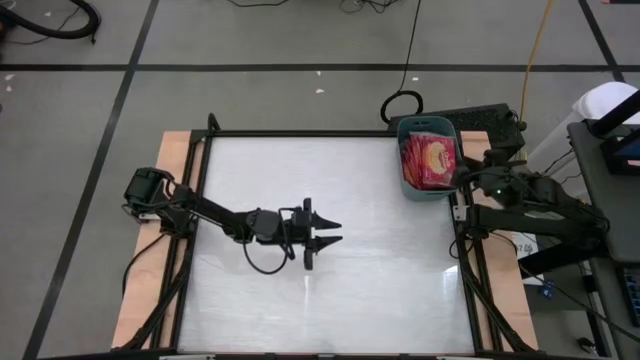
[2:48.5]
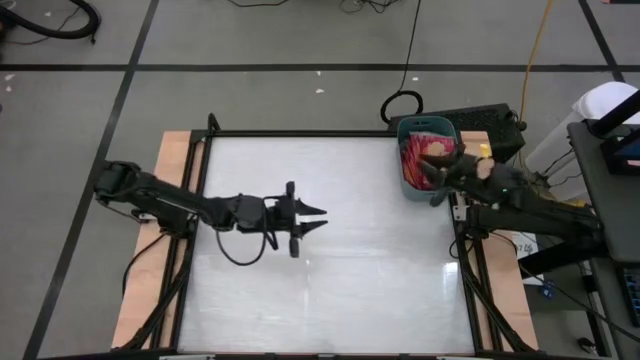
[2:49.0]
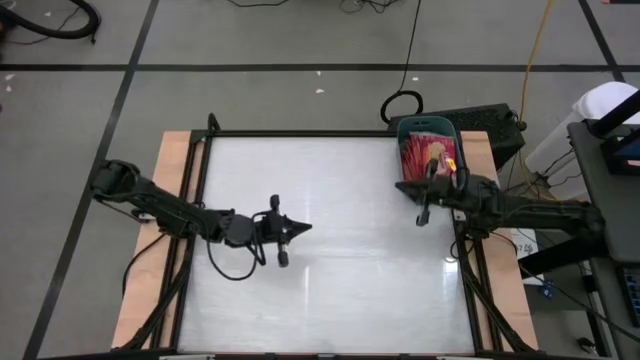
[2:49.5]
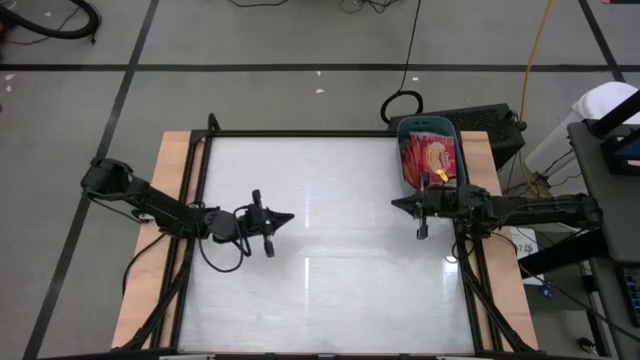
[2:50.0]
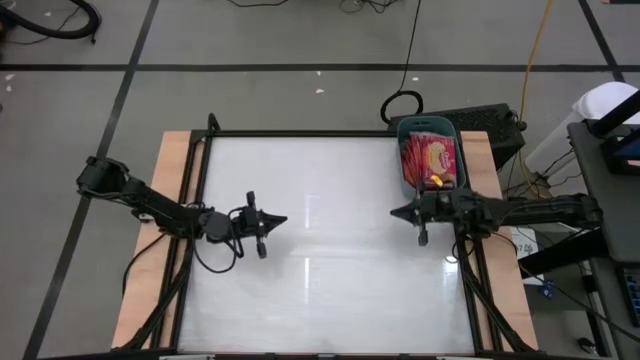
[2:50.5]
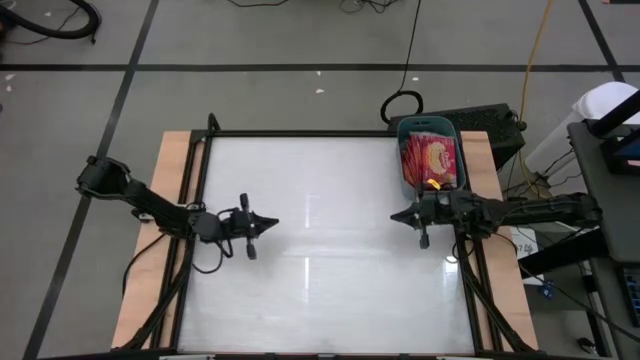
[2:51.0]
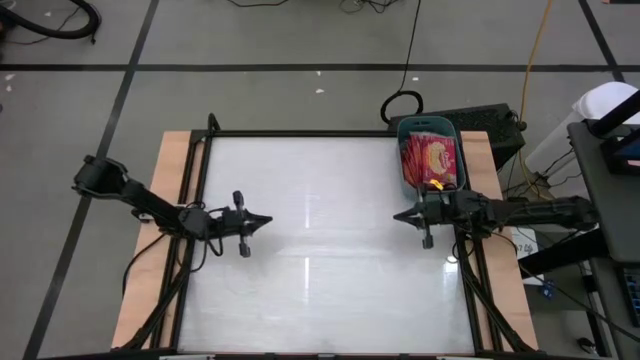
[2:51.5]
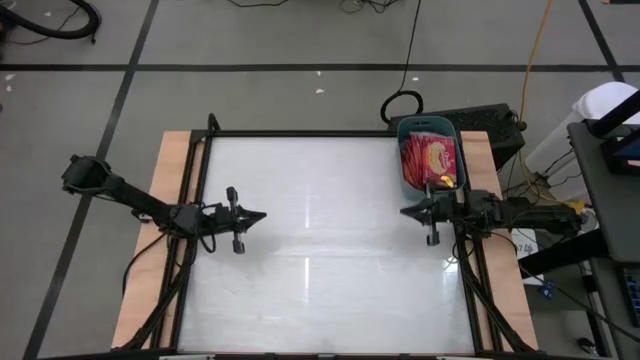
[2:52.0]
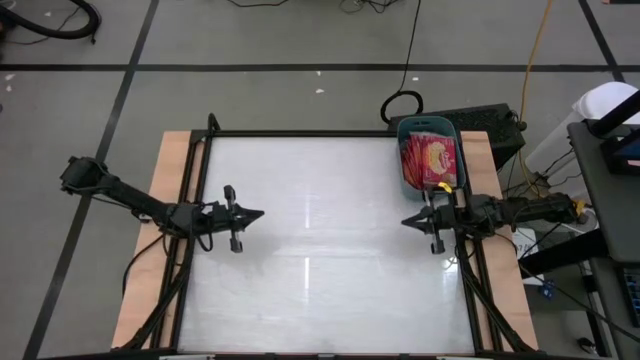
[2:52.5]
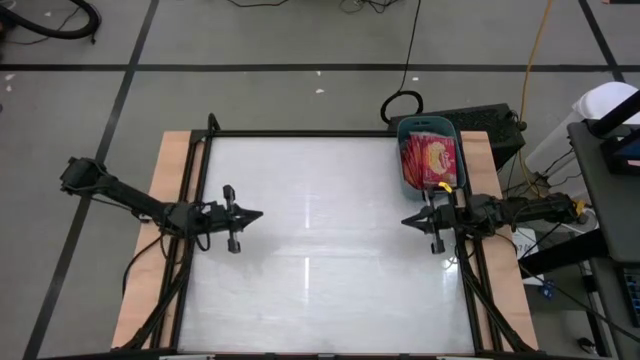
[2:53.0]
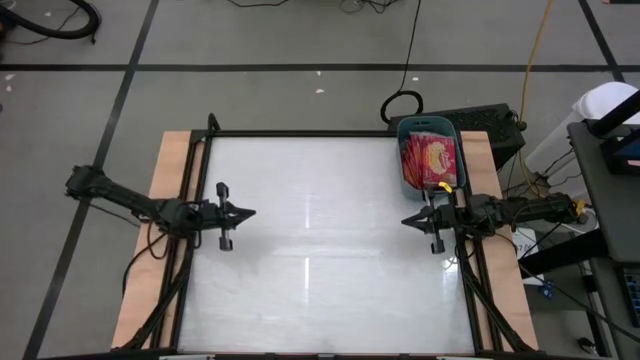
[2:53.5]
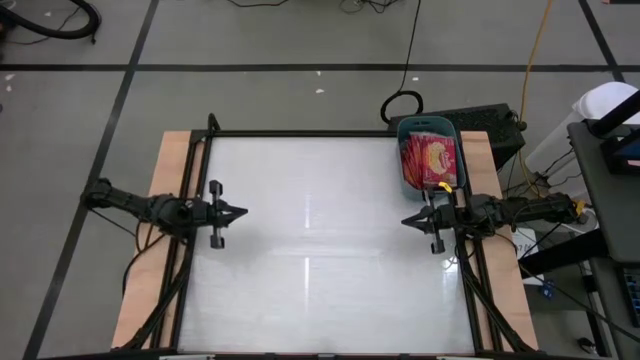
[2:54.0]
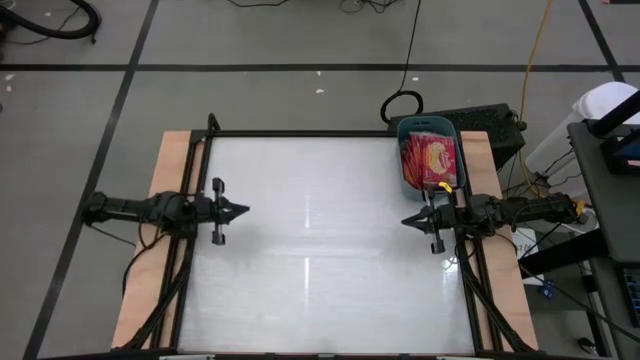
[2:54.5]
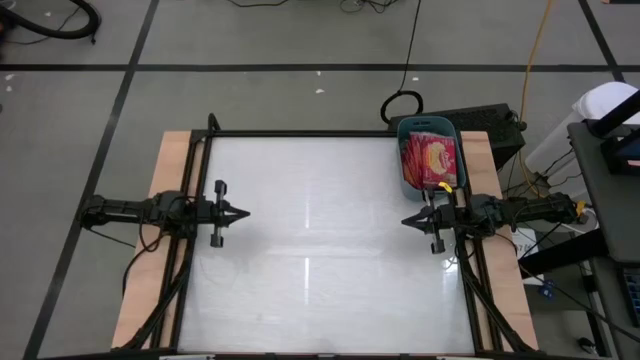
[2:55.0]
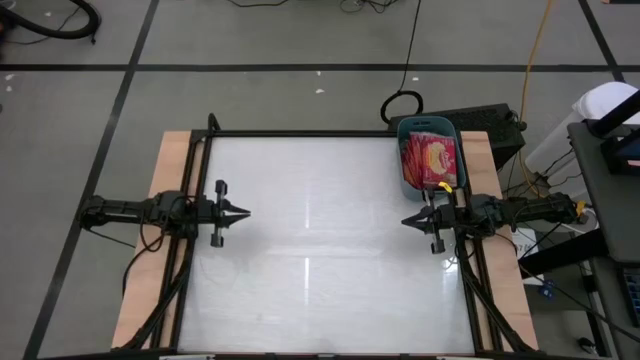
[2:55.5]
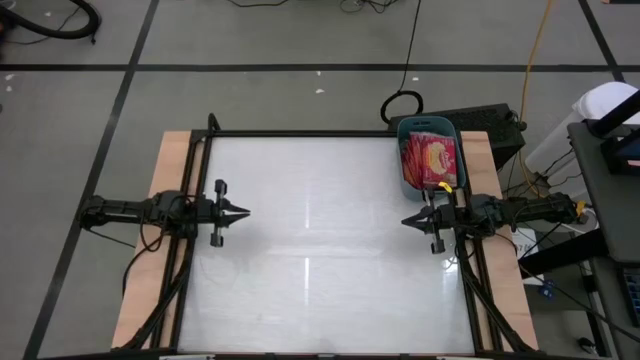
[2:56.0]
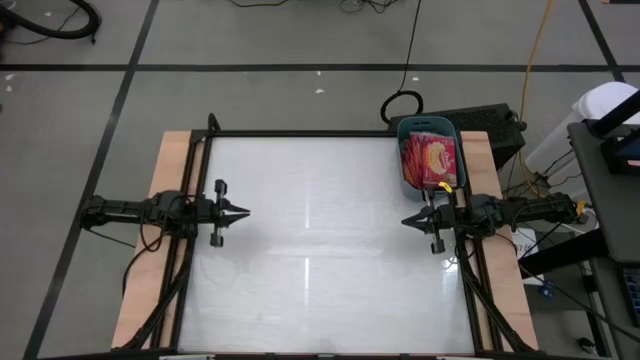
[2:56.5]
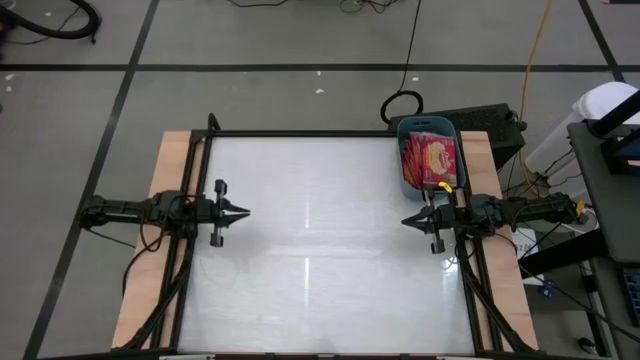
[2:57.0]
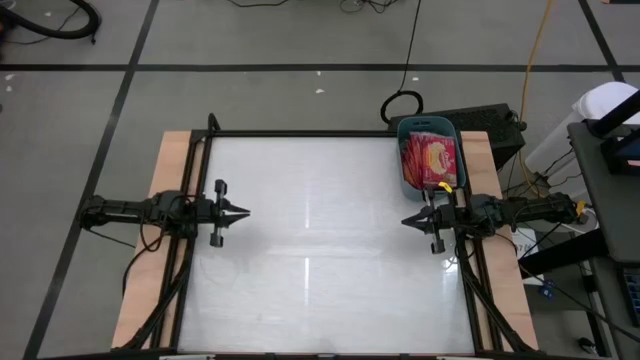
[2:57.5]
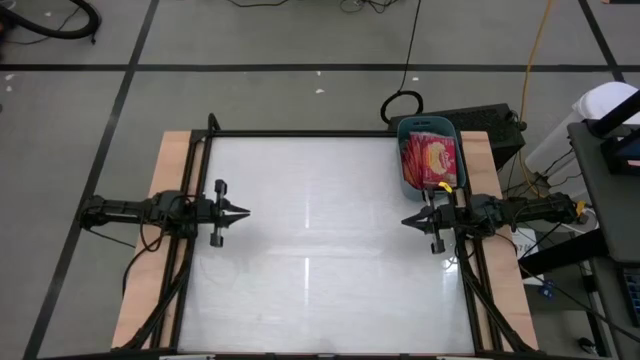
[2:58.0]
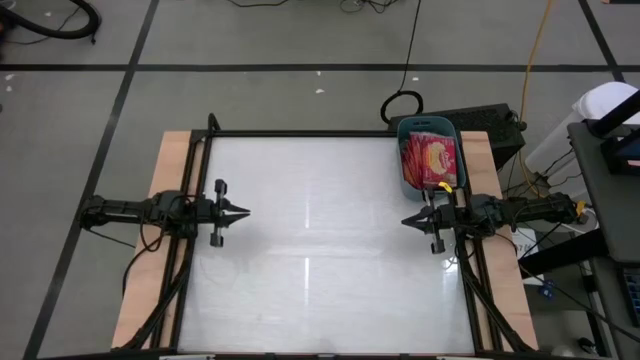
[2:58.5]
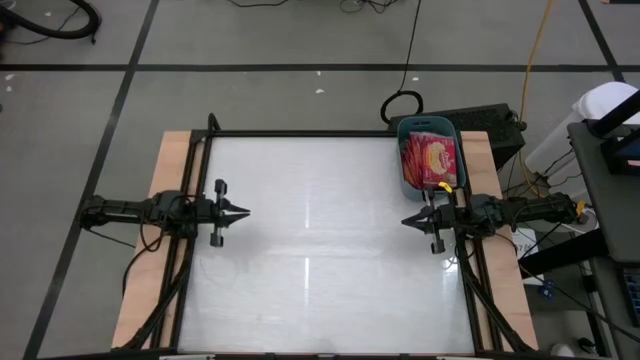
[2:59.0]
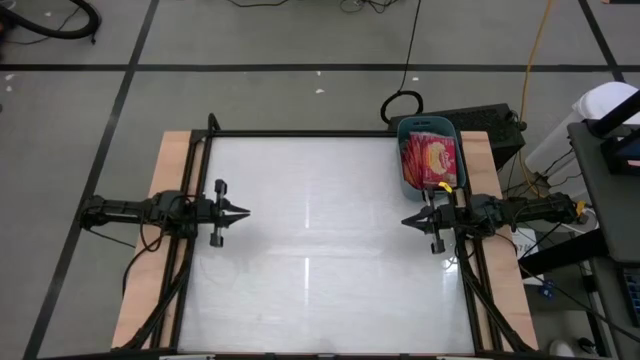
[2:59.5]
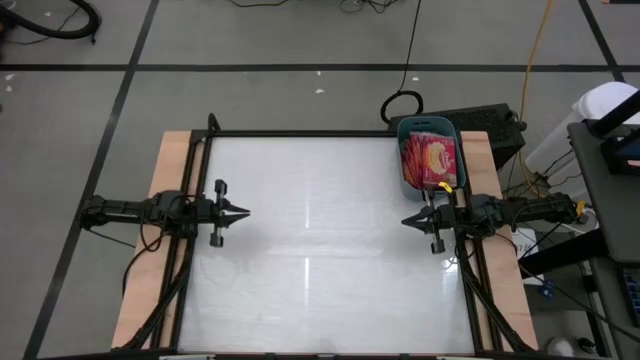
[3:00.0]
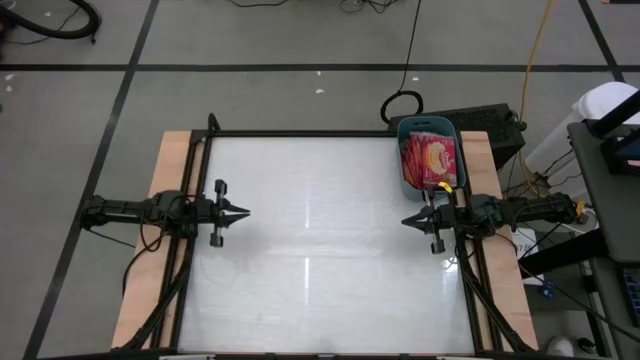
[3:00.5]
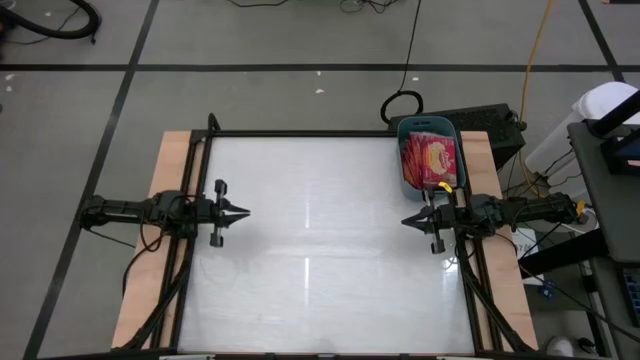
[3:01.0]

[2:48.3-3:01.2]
Task: Sort popcorn bags into baskets
Return to Home Position

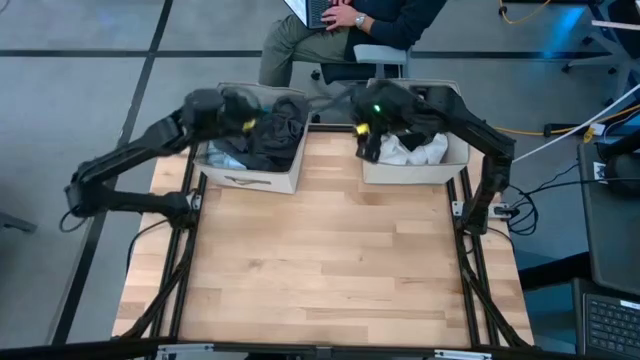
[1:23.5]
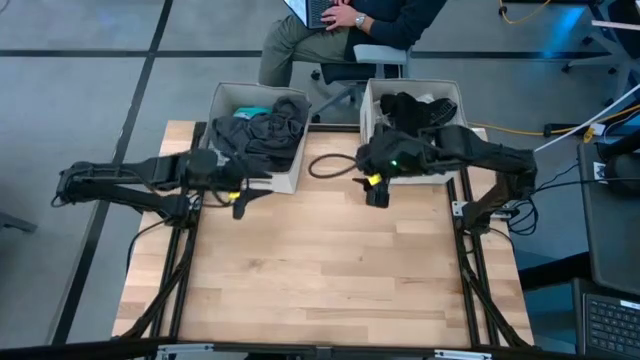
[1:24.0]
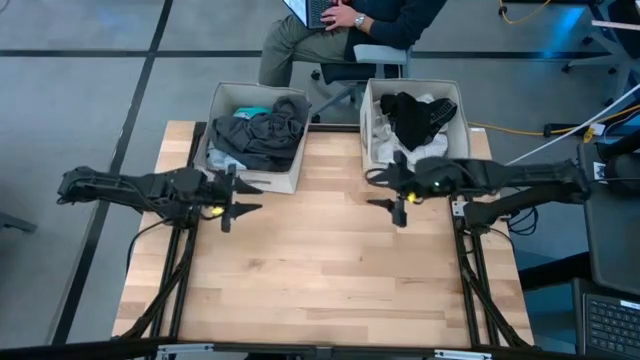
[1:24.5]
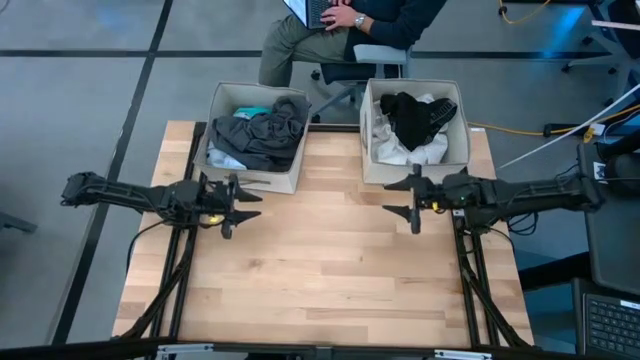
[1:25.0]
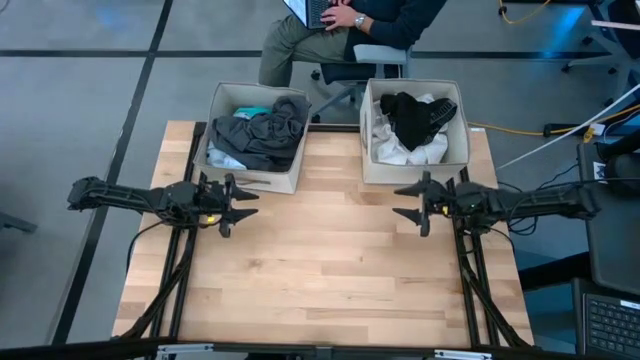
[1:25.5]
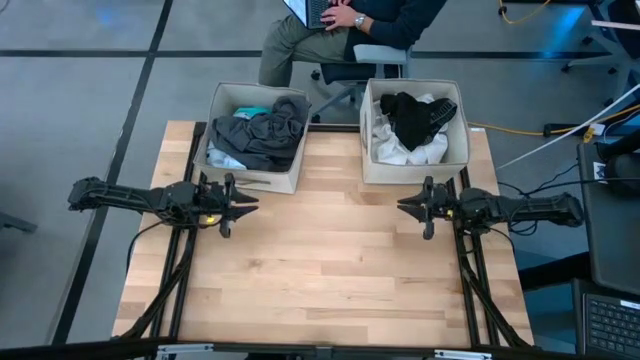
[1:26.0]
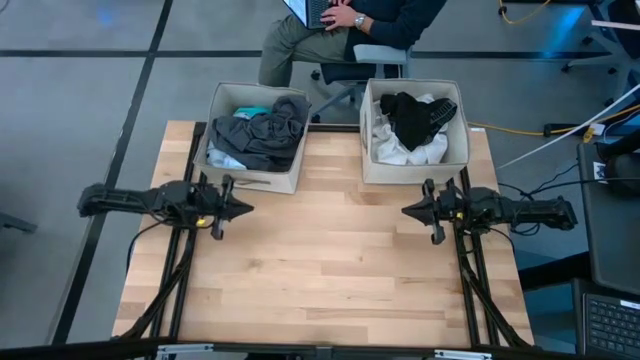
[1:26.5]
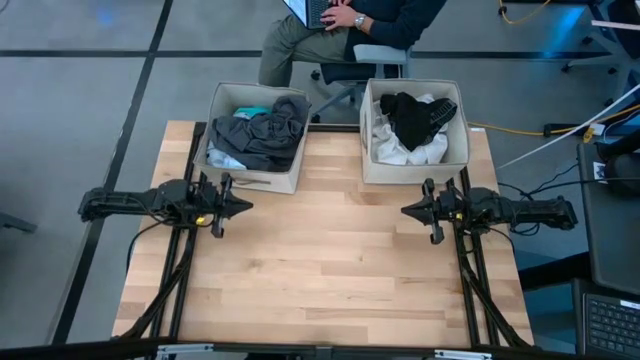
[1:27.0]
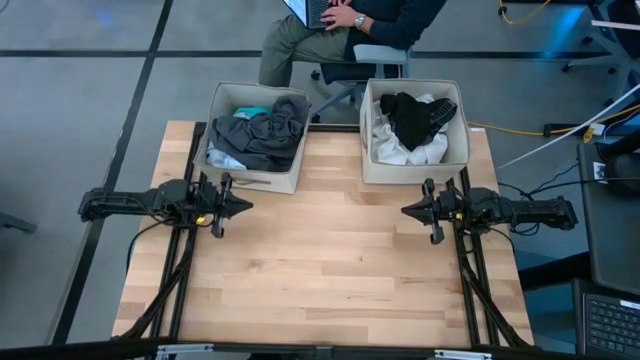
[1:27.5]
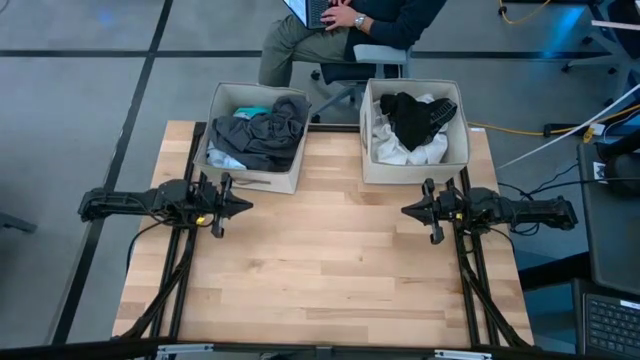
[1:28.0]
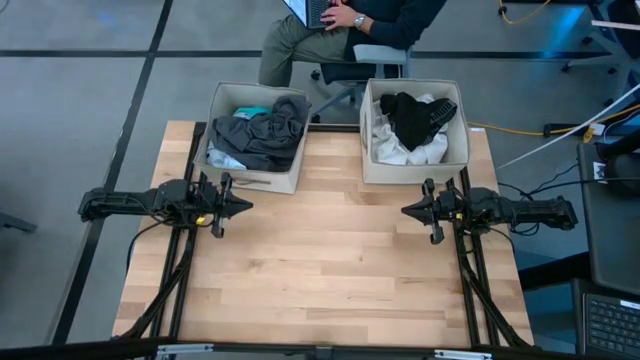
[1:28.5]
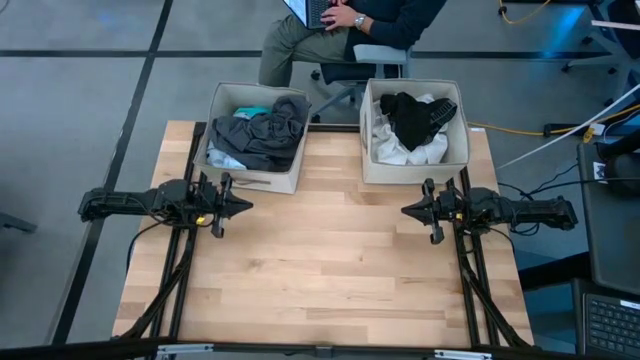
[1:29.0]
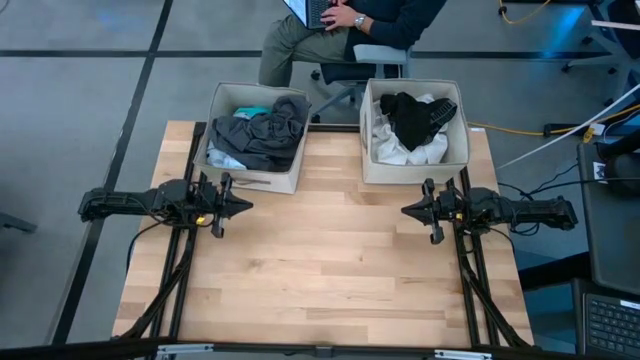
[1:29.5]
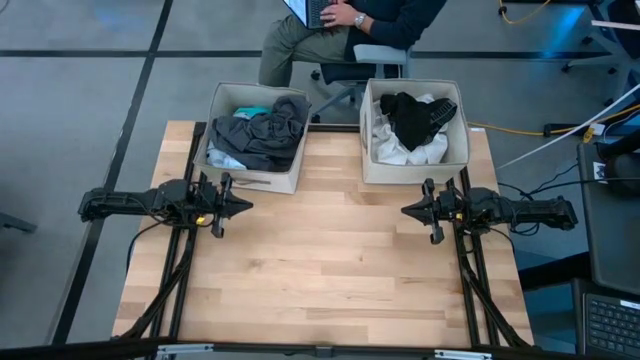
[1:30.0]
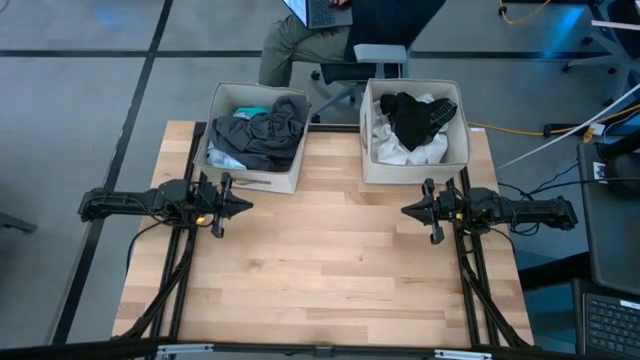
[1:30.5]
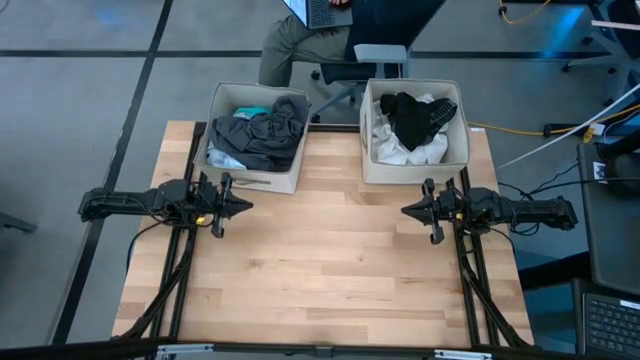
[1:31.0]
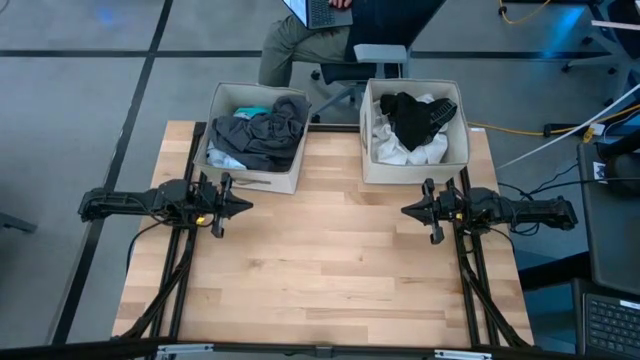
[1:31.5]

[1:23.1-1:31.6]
Task: Sort clothes
Return to Home Position
